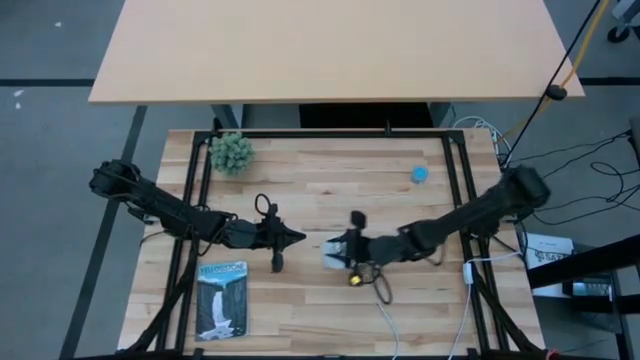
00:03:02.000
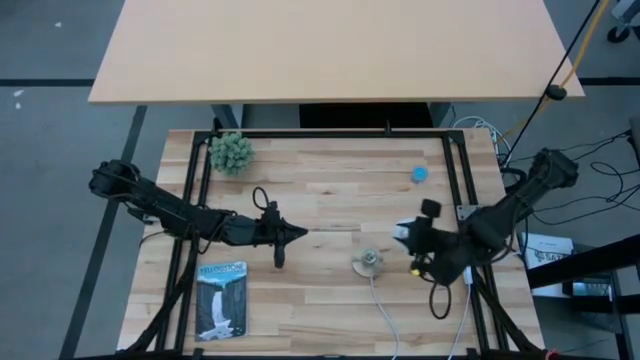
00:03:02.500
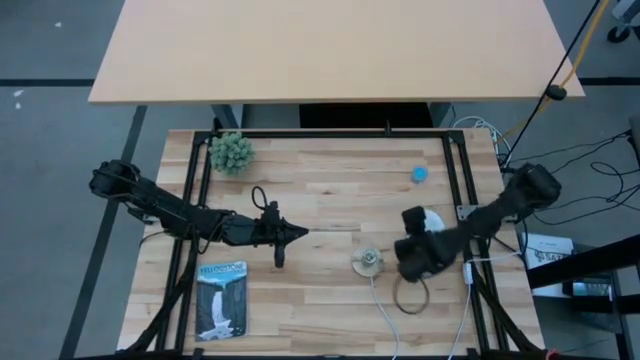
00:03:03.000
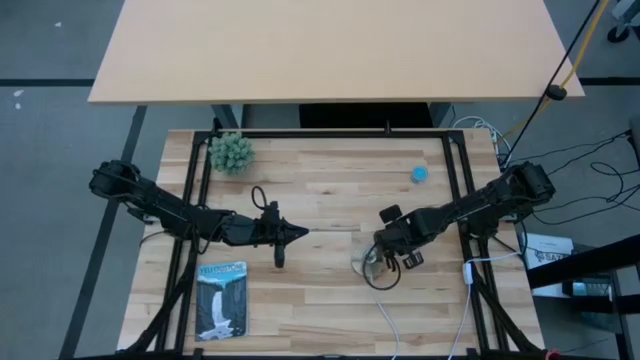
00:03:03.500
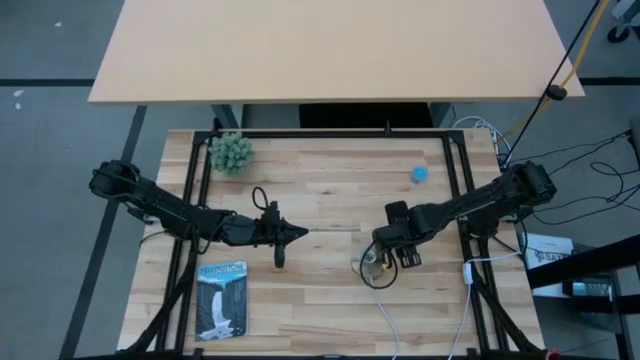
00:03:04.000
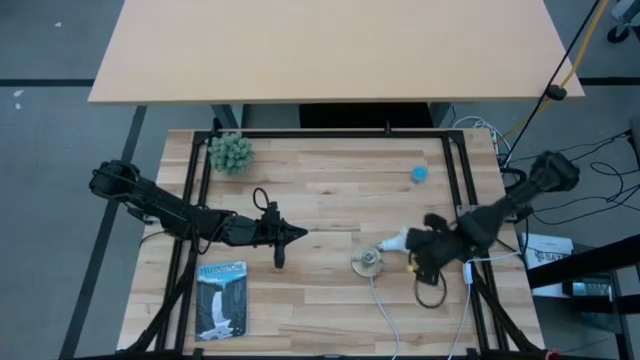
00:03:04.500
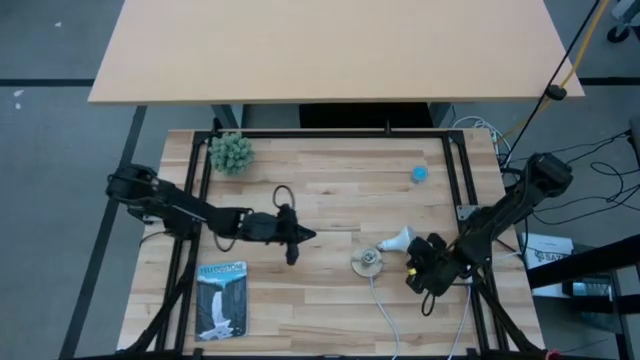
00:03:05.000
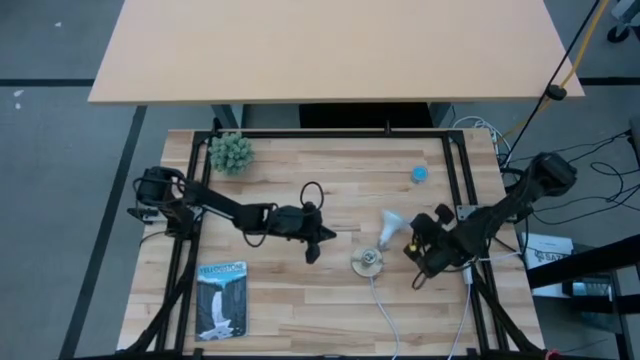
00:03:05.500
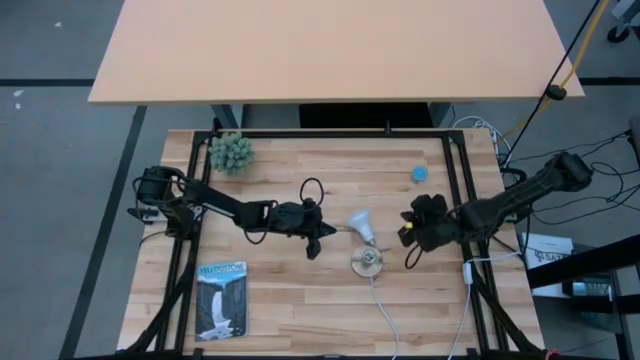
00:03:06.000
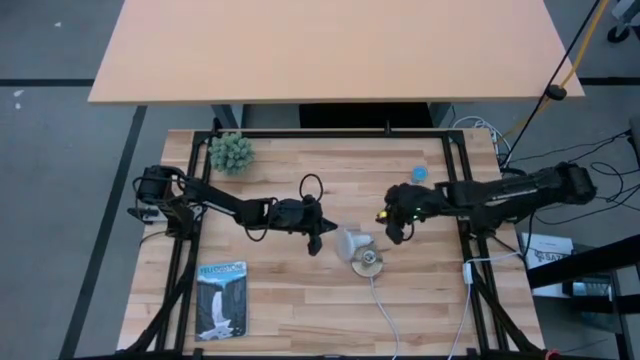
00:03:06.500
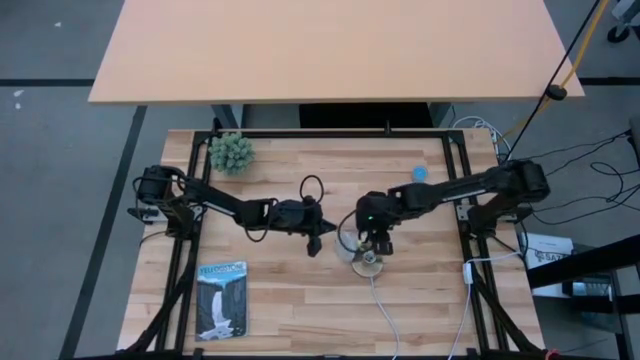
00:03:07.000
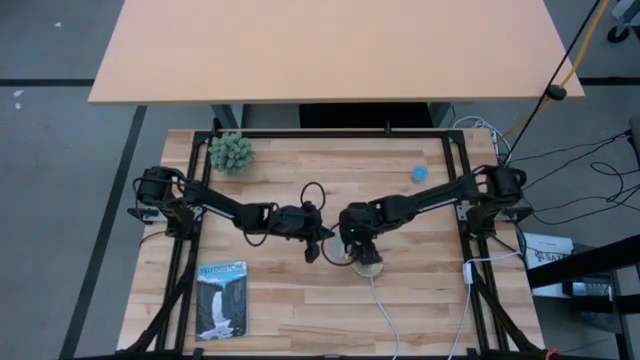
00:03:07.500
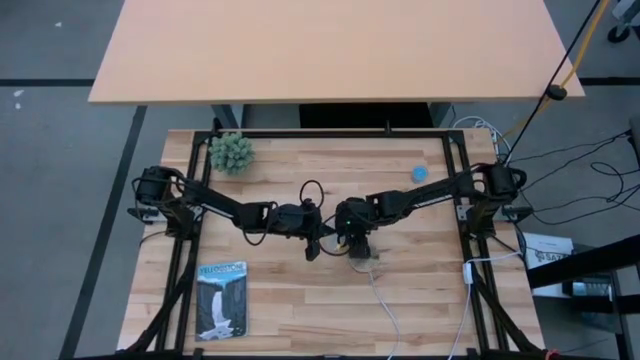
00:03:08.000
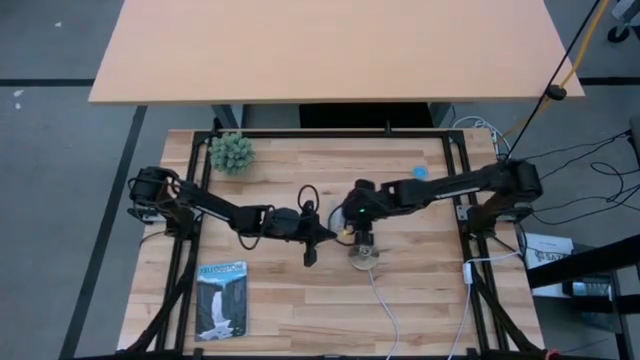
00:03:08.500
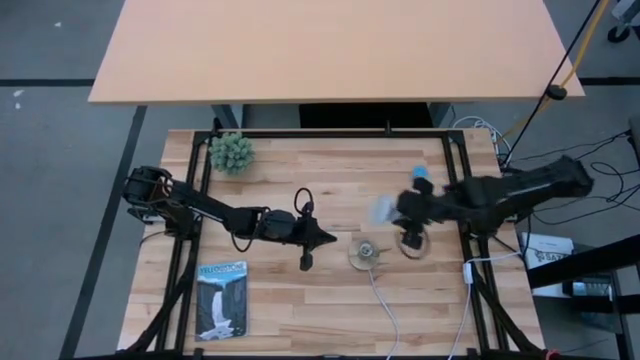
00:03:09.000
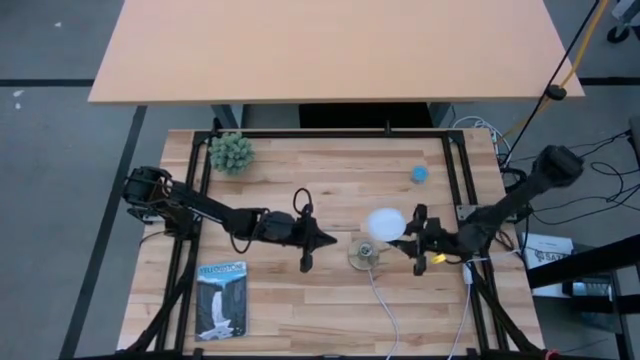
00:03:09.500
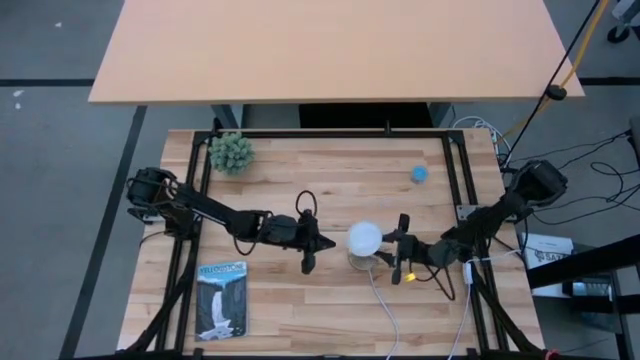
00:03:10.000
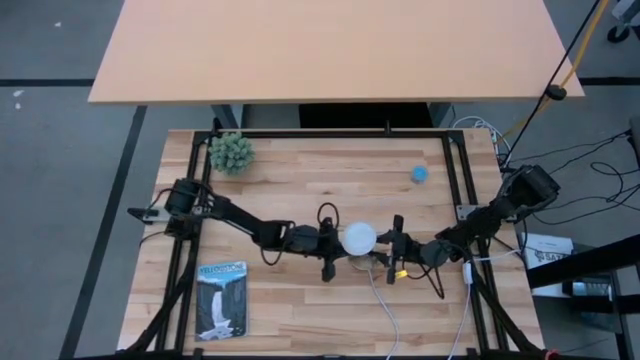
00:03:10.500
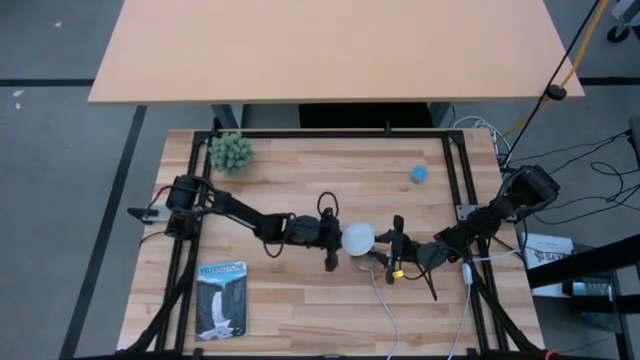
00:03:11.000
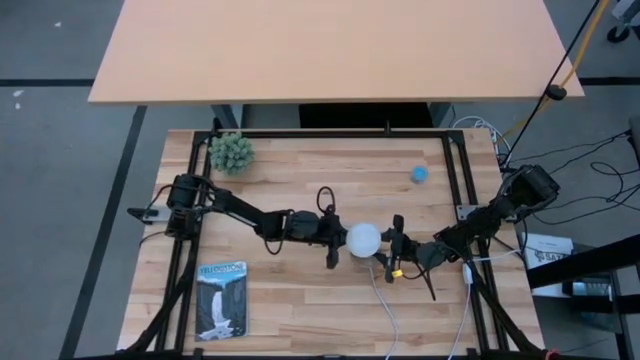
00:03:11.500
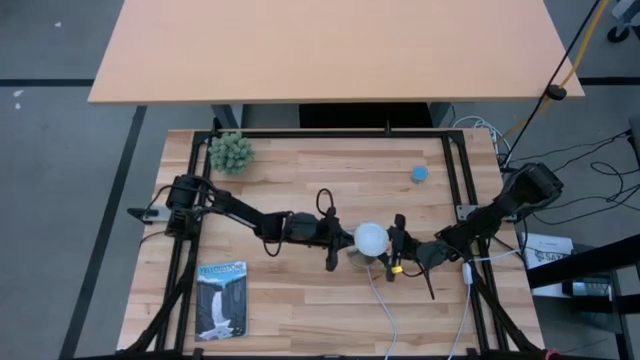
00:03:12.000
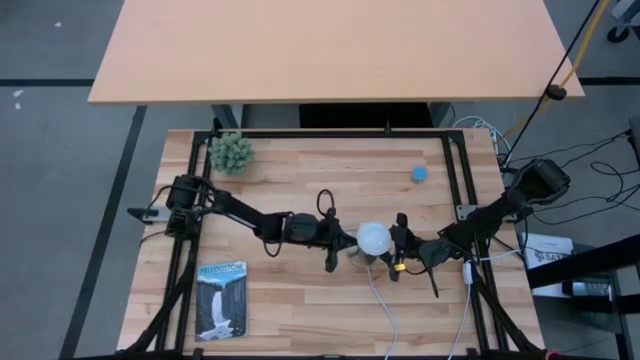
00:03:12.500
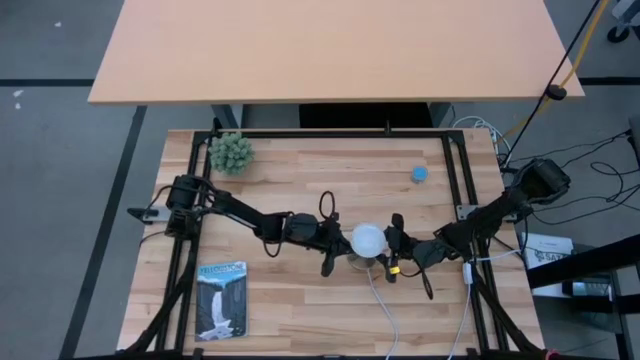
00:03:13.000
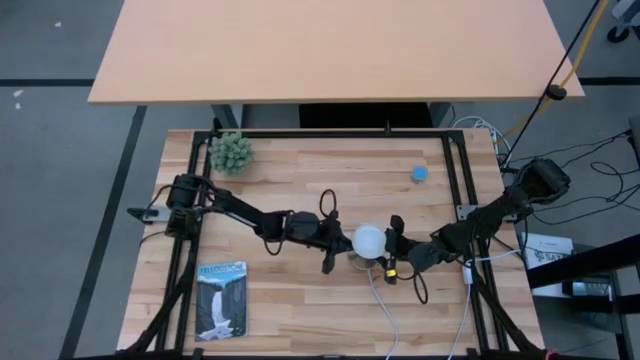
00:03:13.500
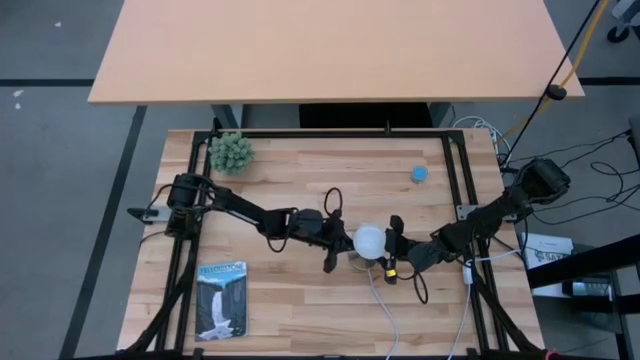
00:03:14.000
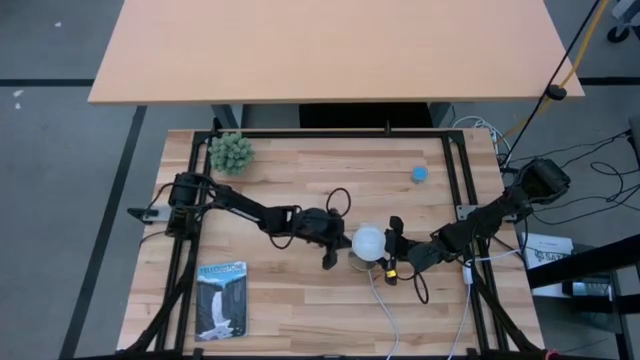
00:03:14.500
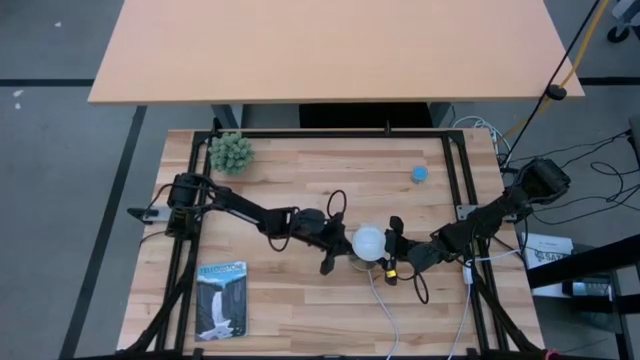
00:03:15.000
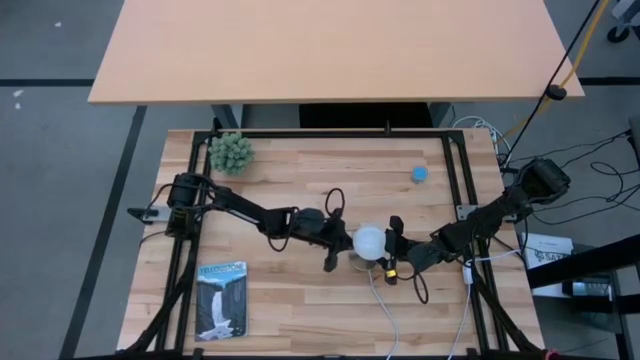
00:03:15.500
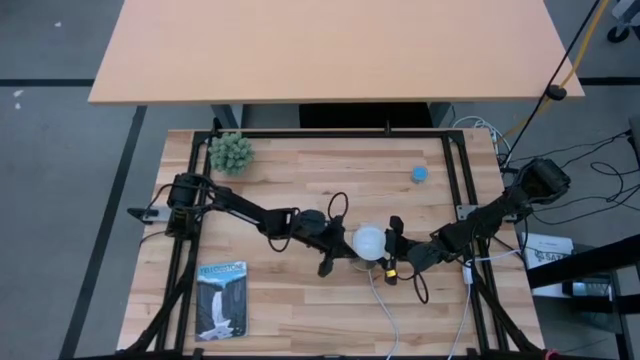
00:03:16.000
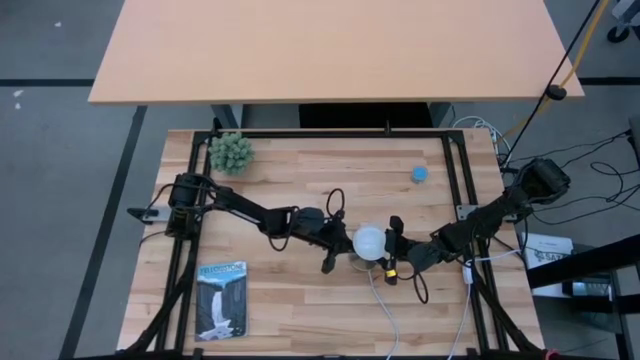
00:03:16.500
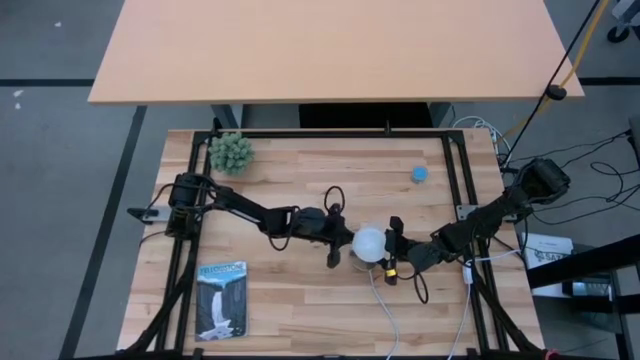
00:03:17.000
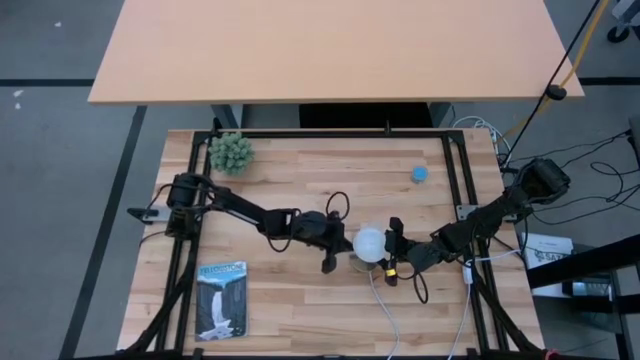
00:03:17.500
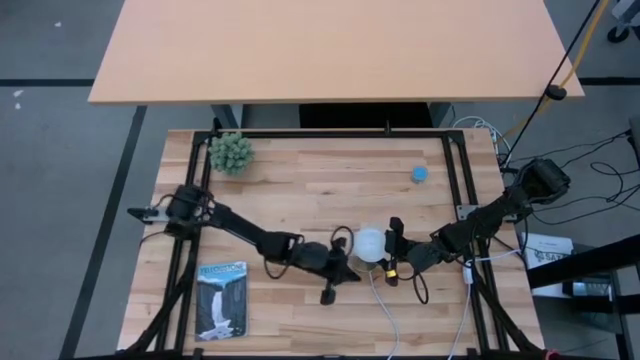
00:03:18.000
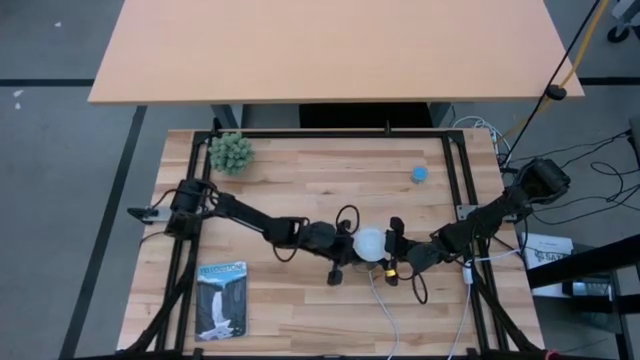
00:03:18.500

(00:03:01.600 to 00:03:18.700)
Task: Screw lightbulb
Insert the lightbulb into the desk lamp

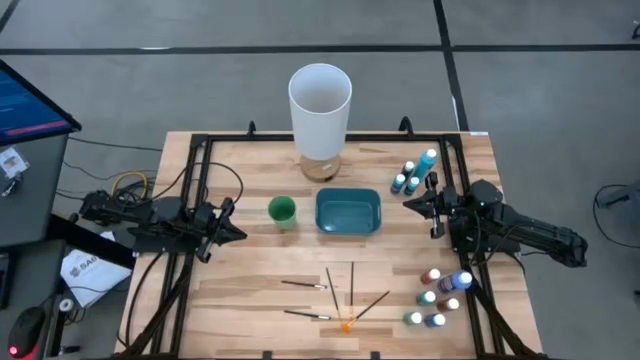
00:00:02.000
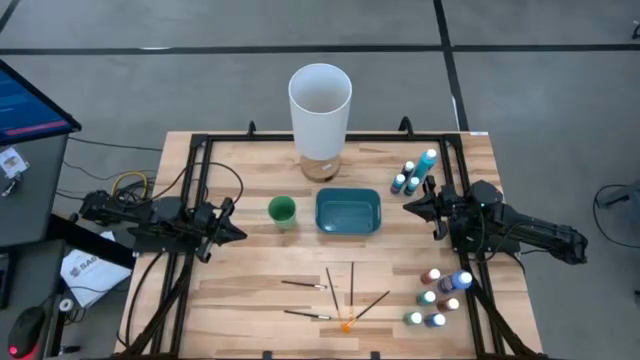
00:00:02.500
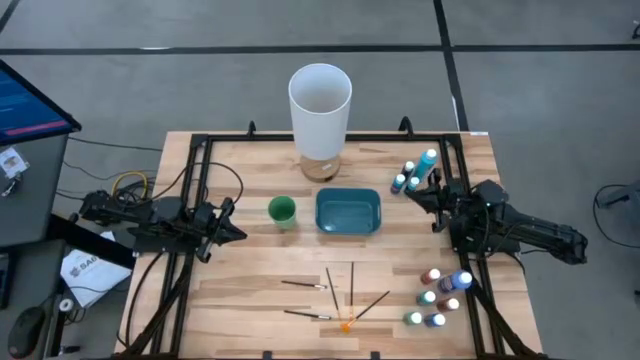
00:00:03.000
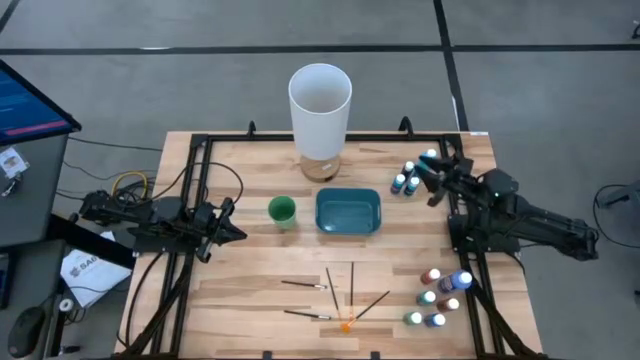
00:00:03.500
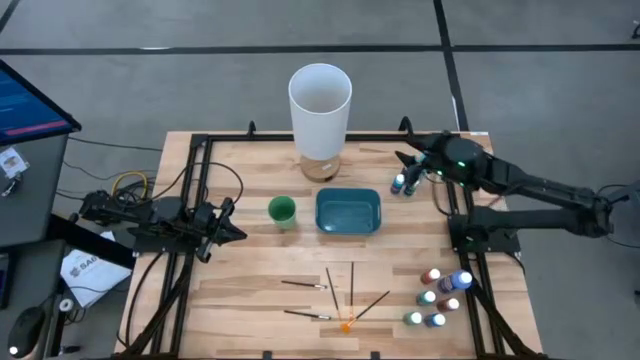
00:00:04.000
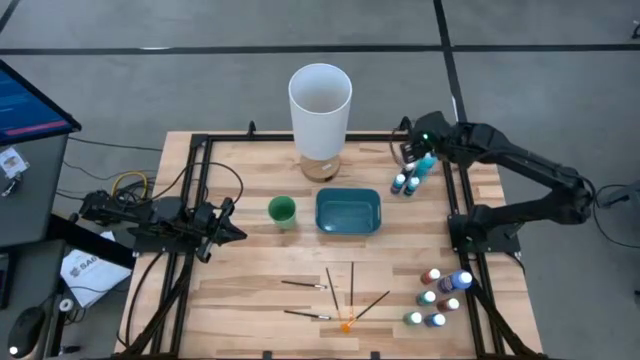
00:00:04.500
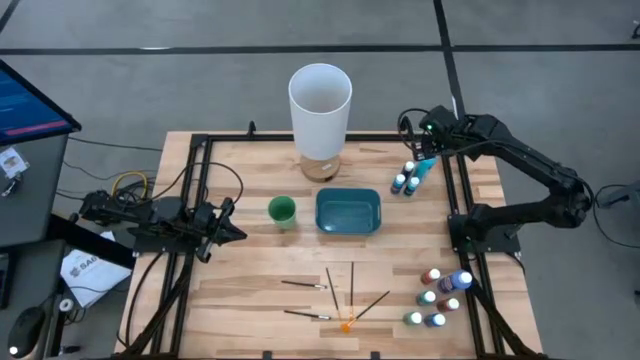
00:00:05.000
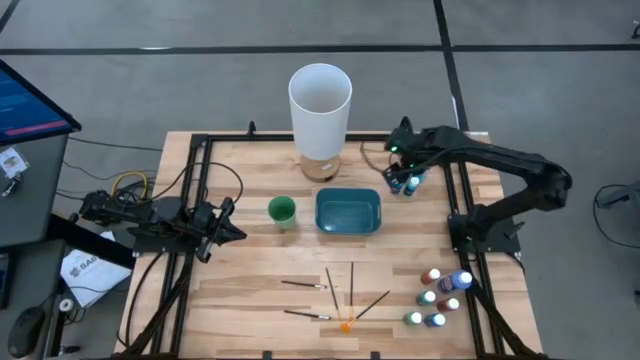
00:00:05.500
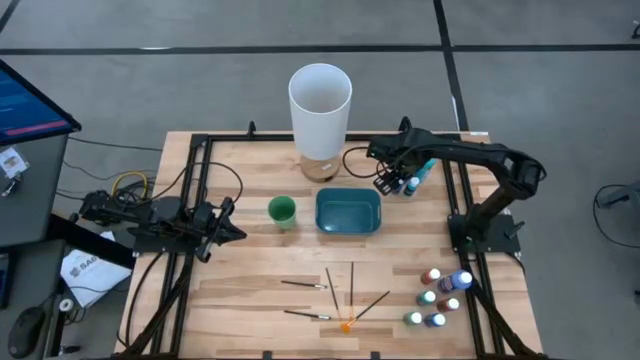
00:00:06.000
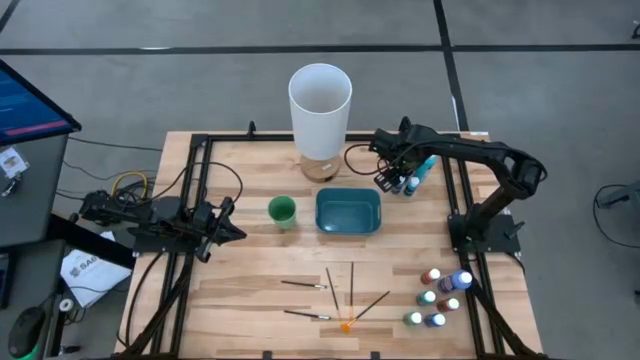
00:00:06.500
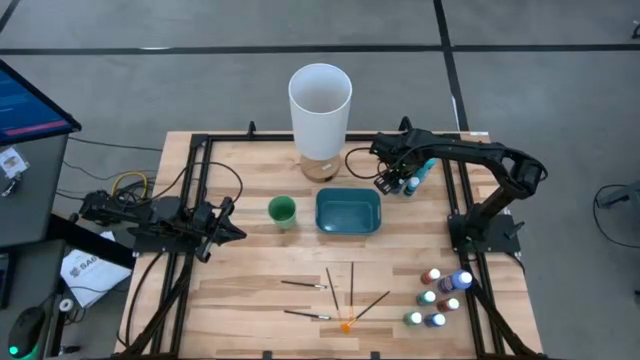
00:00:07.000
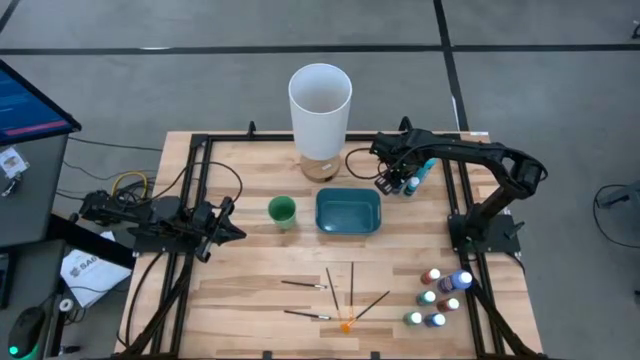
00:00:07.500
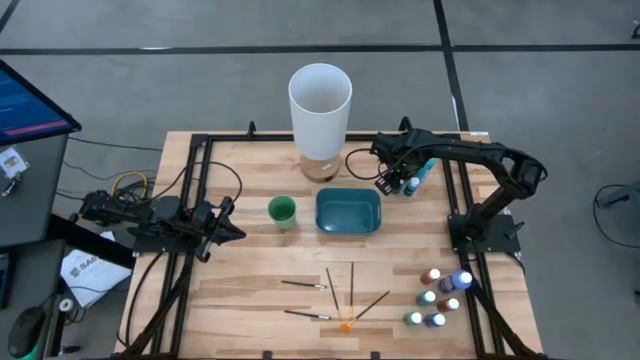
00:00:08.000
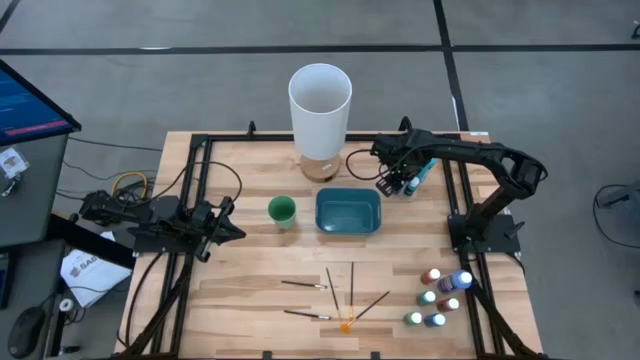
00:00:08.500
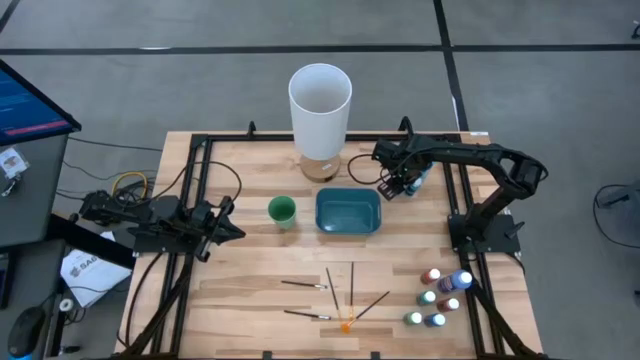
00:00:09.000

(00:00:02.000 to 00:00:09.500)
Task: Pick & Place Paint Supplies
Put the top small blue paint bottle into the green bin
